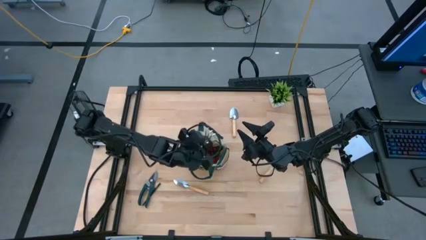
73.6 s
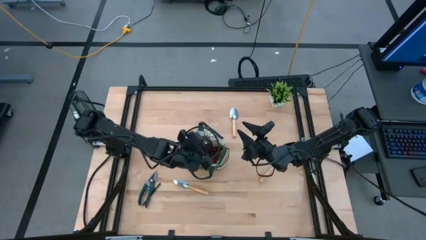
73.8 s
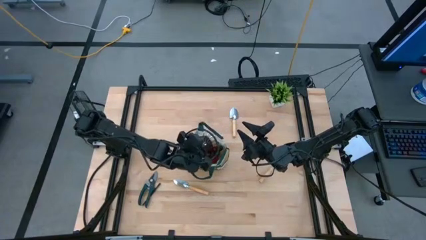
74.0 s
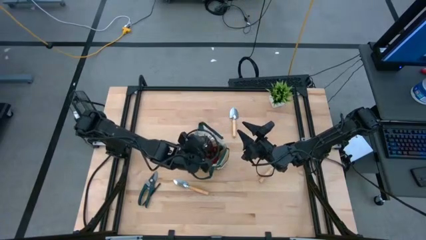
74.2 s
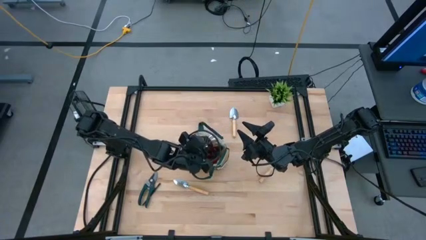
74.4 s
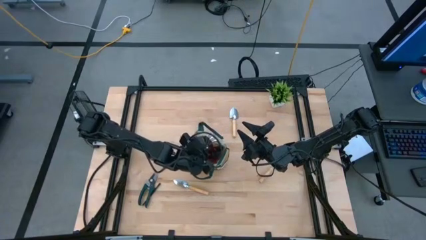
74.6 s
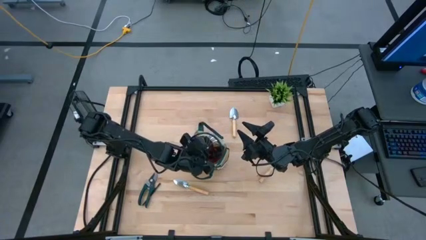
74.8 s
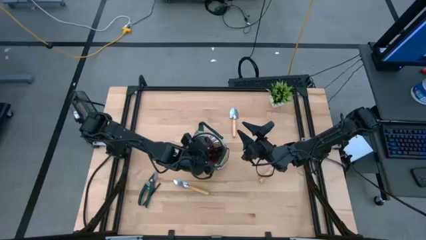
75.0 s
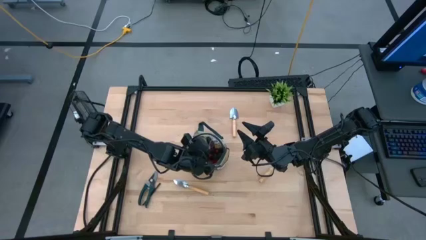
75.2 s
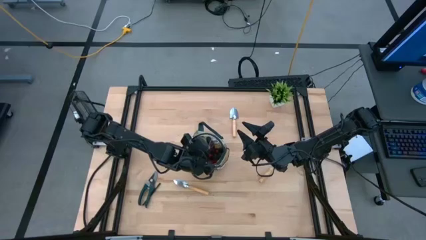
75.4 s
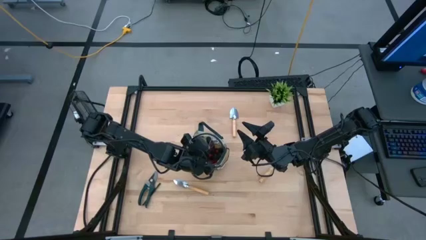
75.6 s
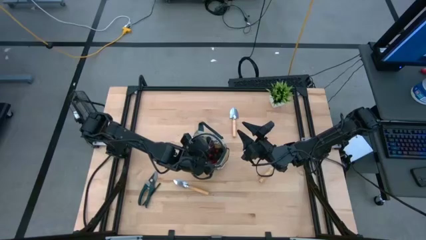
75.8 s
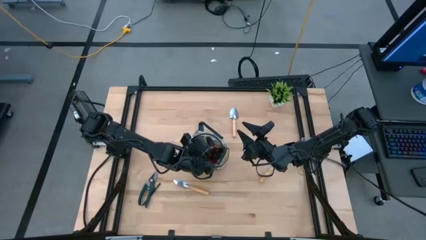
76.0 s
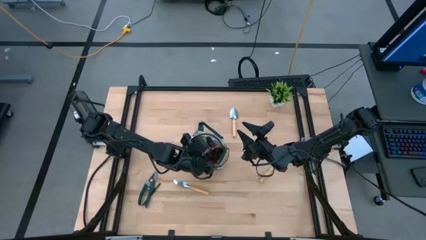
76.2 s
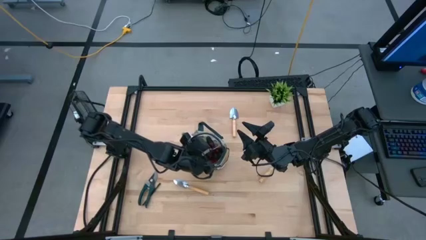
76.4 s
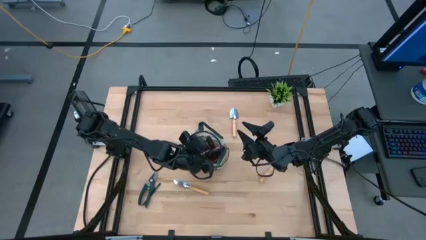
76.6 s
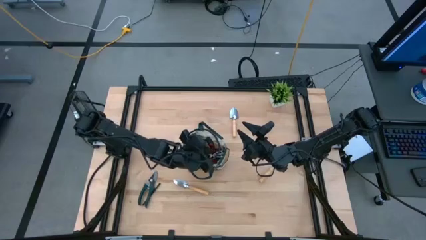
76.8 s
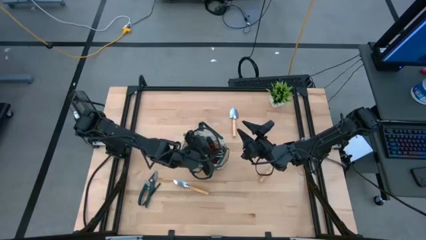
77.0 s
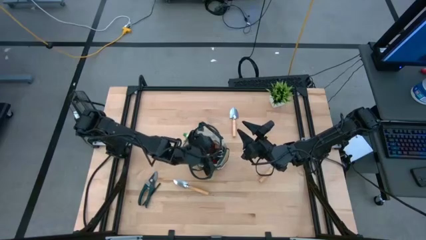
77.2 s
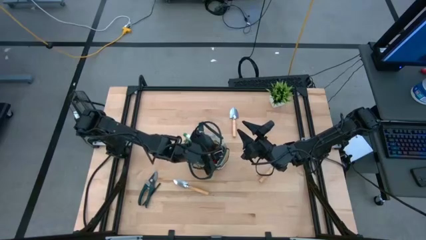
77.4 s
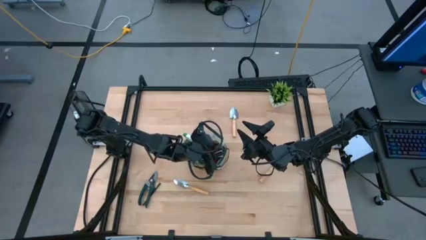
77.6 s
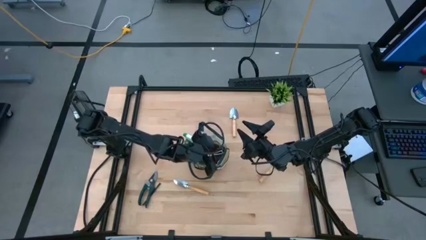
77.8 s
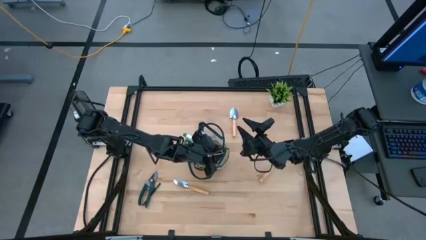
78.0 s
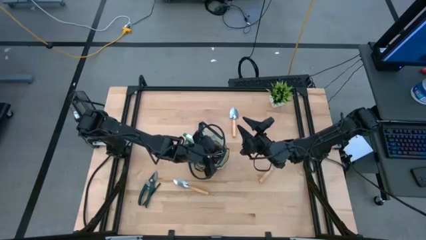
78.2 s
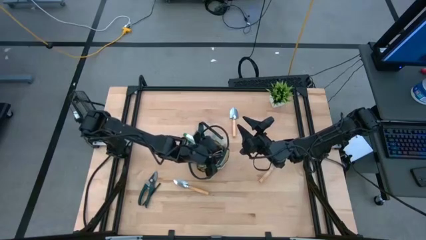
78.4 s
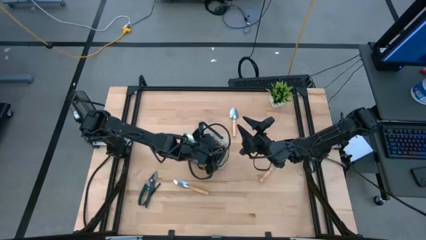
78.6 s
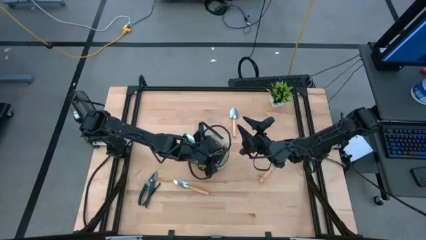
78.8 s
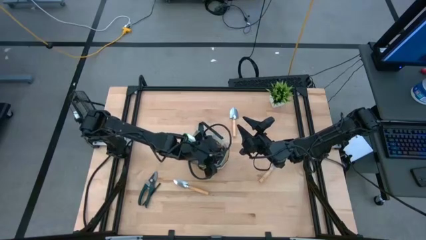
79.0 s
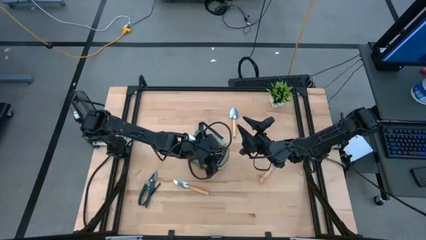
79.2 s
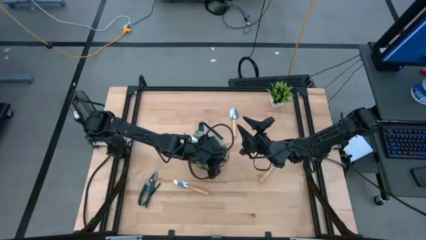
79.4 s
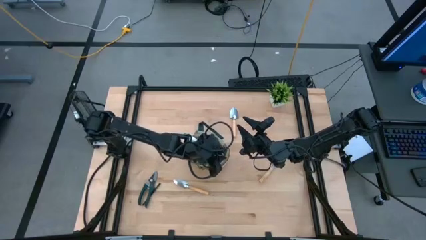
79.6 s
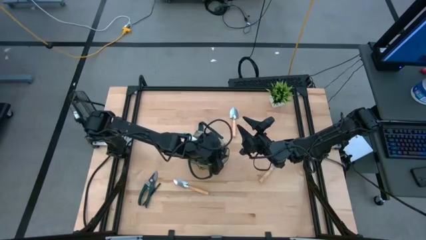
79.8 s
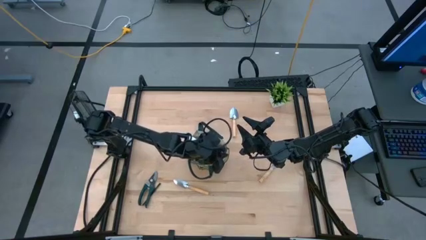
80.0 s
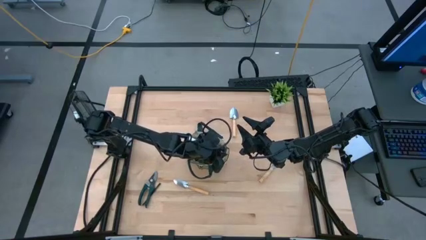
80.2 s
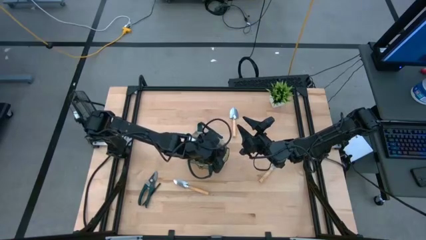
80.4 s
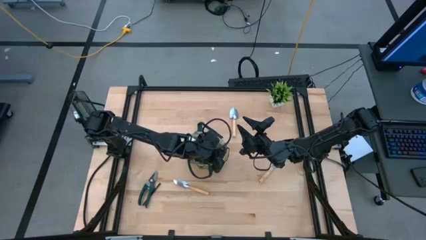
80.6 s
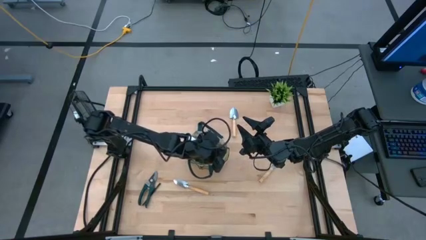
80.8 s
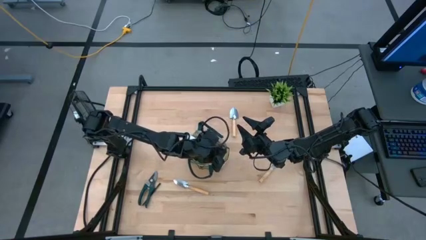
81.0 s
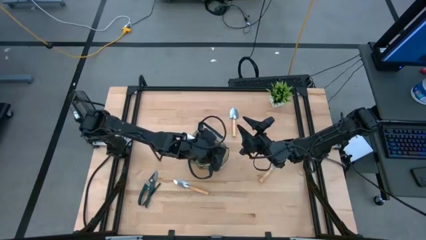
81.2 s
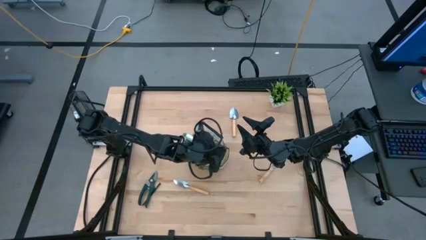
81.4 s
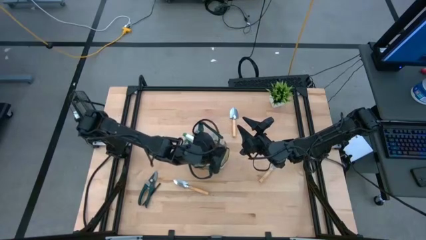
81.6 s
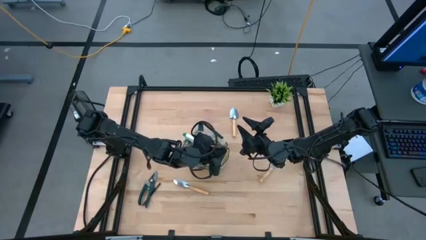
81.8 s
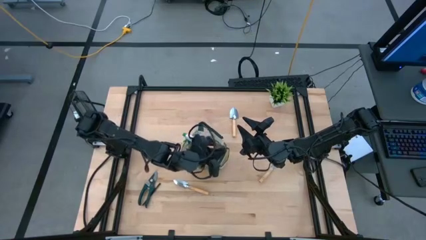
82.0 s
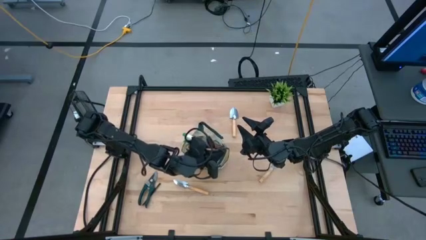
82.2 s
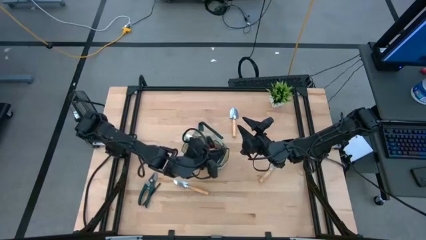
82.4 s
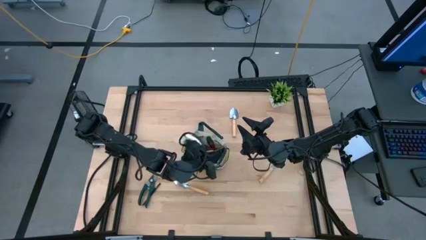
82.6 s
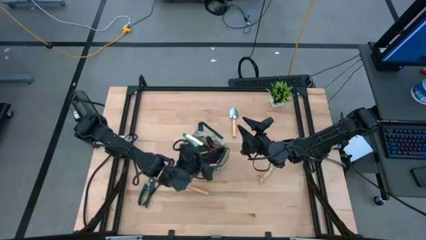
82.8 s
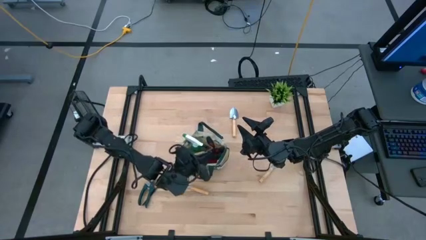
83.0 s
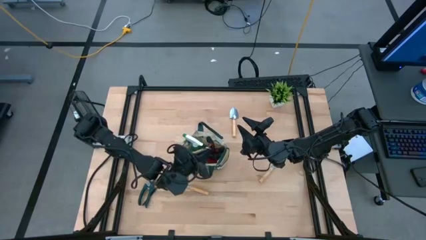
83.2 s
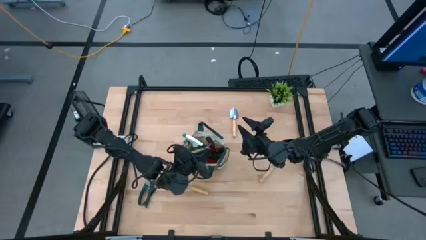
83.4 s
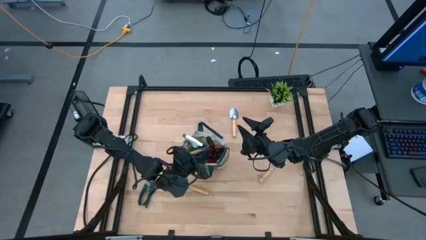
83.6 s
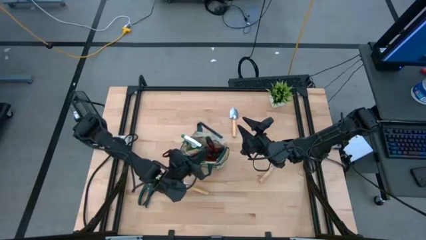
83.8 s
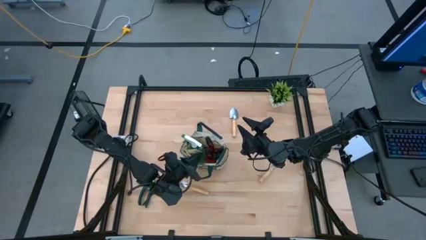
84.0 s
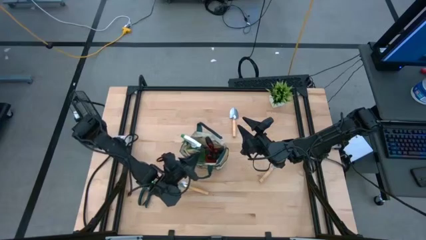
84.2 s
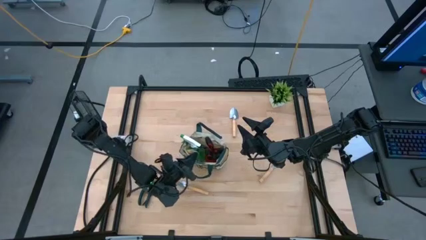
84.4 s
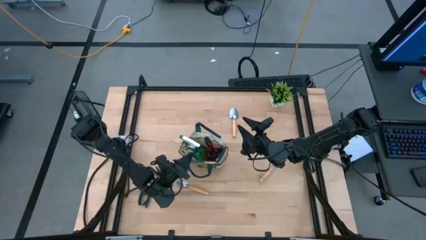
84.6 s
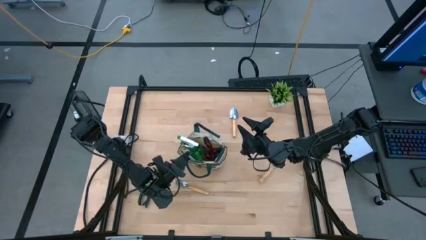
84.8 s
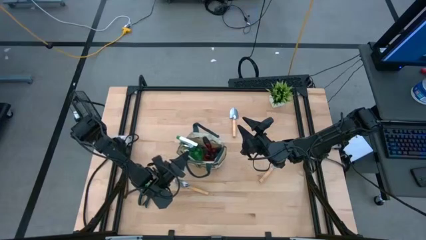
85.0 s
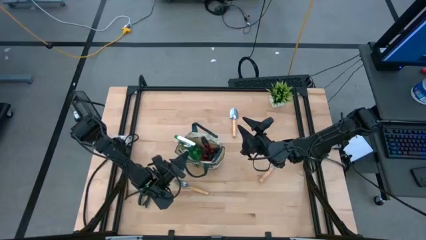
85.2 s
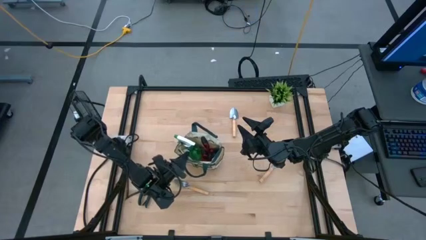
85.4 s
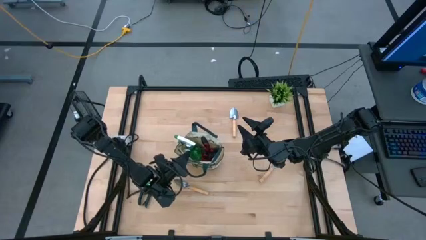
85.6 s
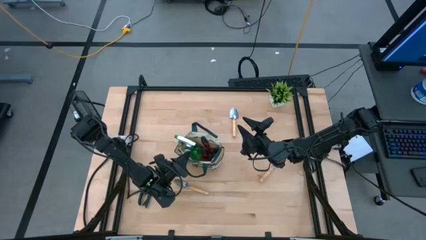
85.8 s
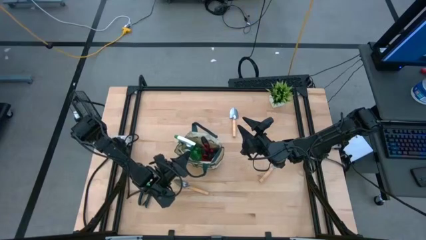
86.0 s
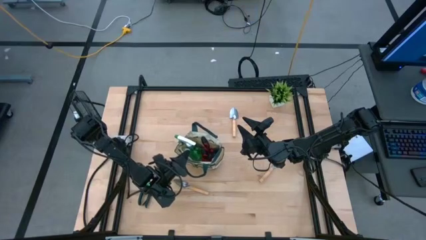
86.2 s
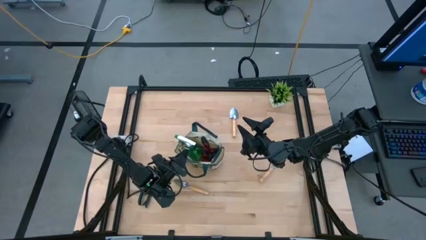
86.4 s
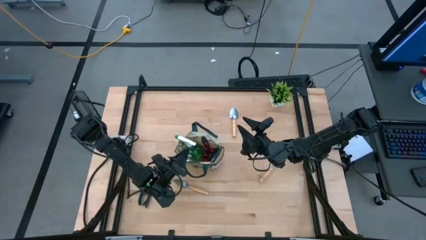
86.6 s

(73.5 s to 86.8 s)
Task: Pick & Place Garden tools in Gardening bag
Put the brown hand rake into the gardening bag
